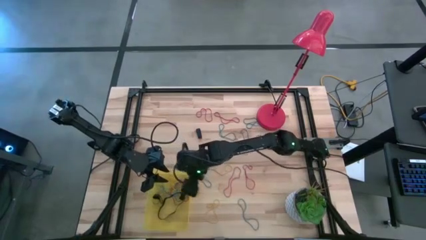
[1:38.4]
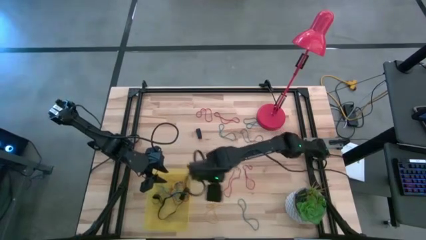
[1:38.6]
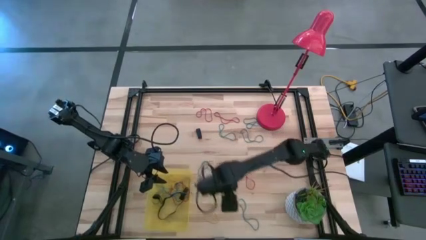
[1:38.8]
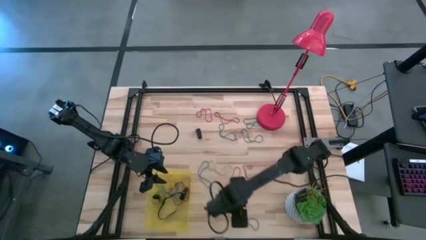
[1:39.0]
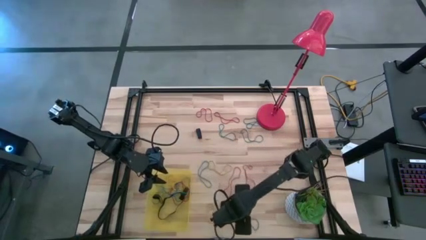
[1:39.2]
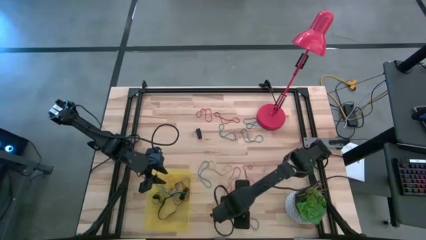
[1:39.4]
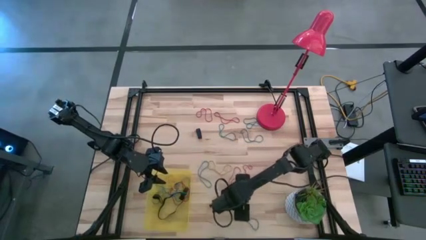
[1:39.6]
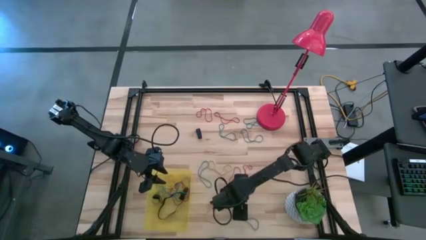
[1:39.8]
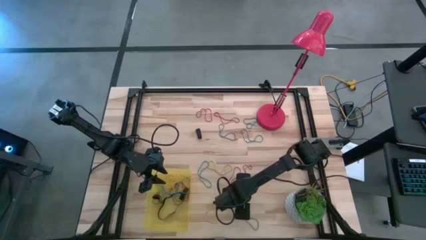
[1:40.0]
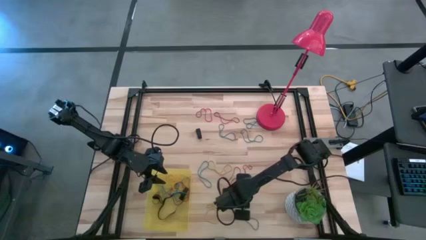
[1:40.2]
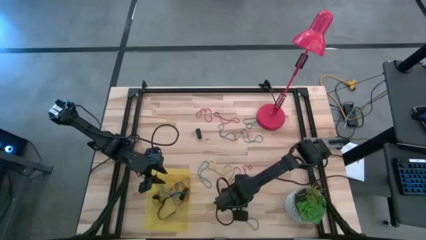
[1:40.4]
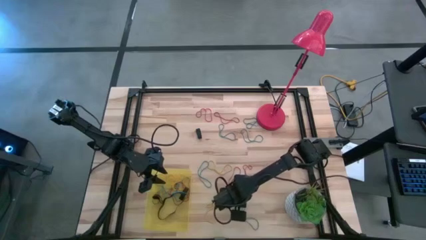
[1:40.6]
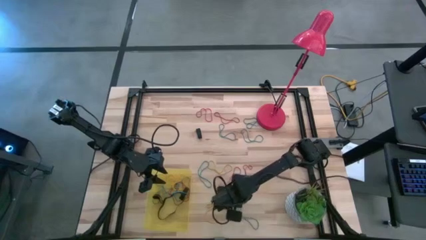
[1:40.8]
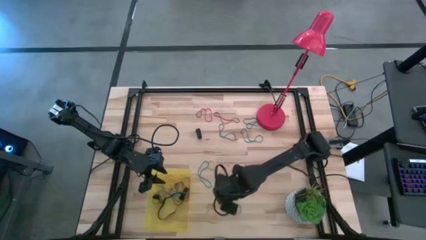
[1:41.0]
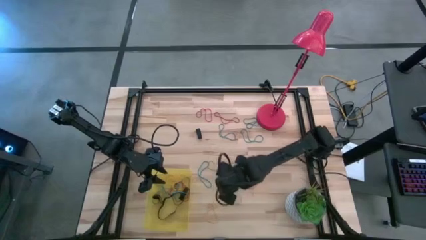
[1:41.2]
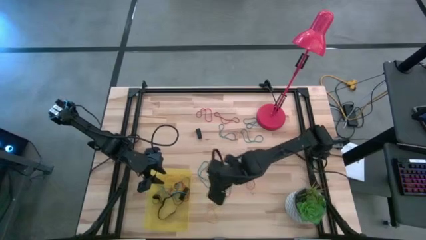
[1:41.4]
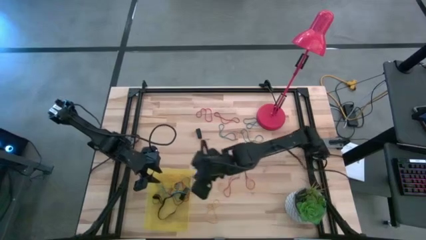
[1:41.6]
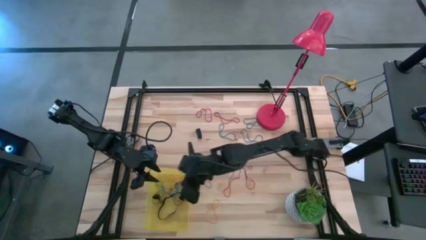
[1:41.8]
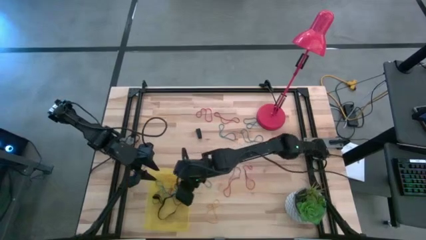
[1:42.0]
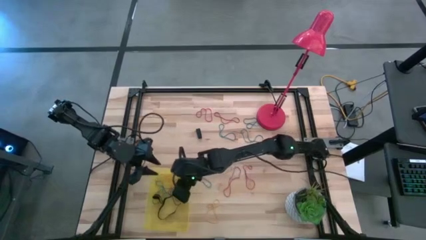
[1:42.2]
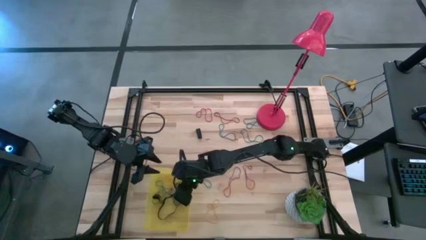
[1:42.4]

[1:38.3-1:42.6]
Task: Pick and place rubber bands into bin
Put the blue rubber band into the bin

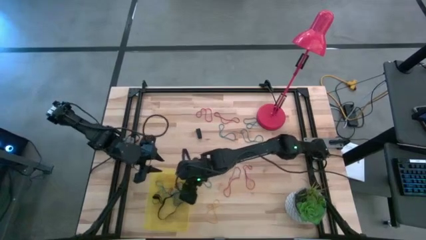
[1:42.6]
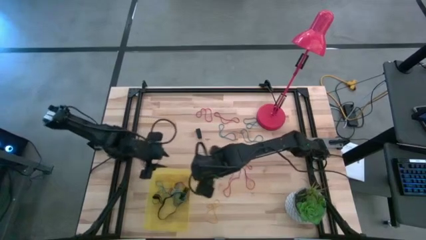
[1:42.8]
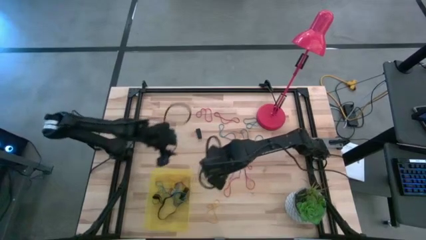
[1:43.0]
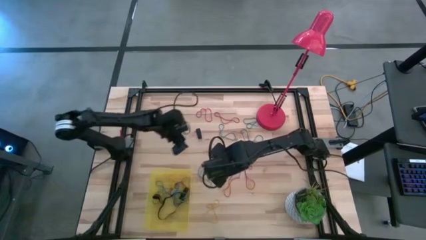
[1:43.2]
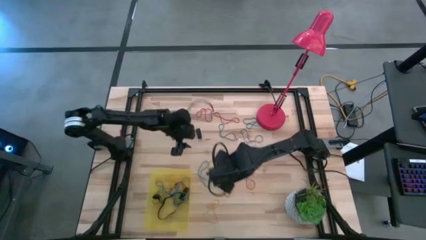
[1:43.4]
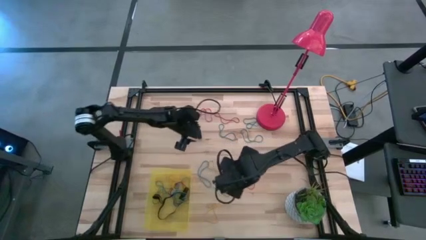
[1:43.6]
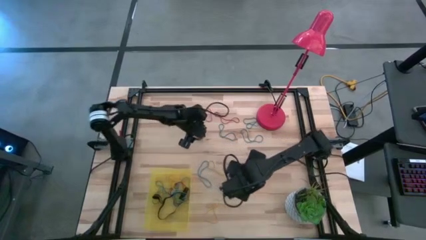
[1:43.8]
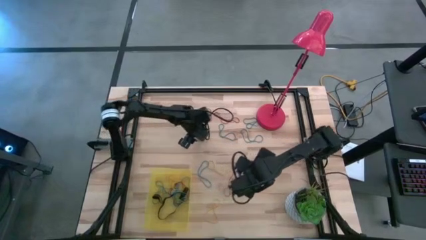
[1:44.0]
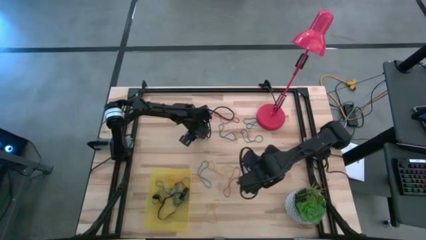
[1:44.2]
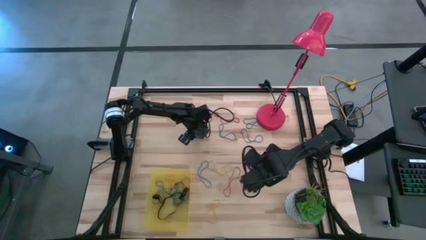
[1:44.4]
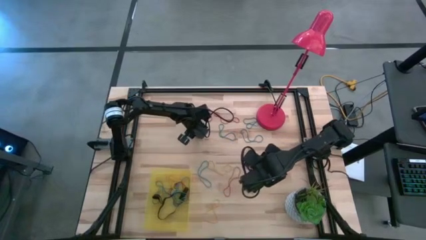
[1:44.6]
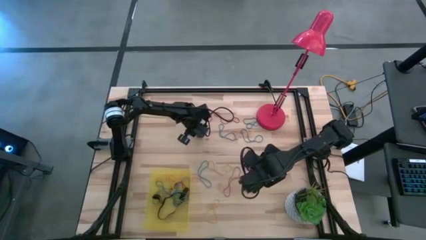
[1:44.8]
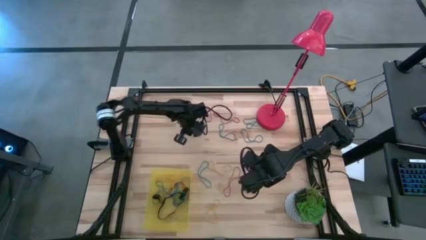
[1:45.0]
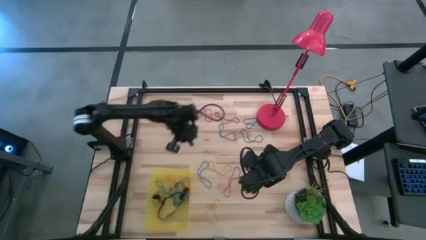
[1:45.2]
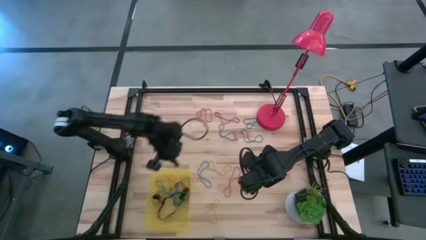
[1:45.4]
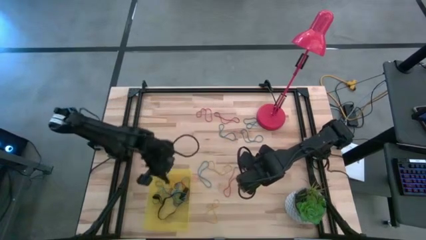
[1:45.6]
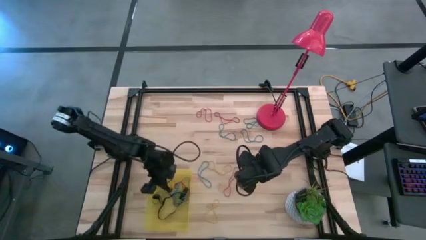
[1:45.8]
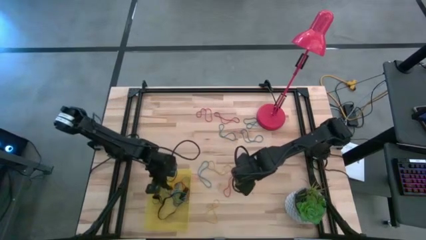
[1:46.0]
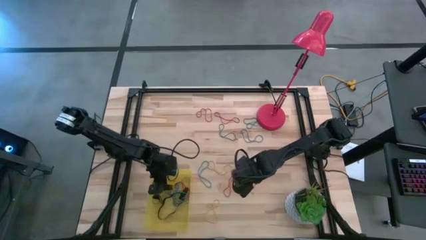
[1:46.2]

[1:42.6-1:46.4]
Put the black rubber band into the bin

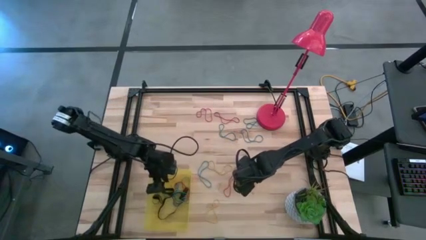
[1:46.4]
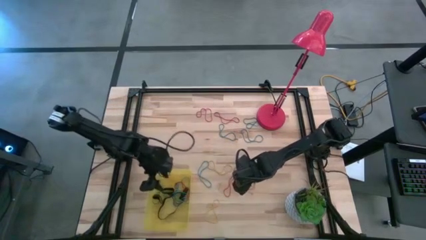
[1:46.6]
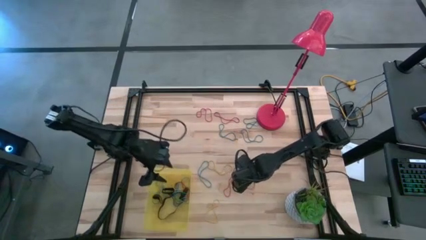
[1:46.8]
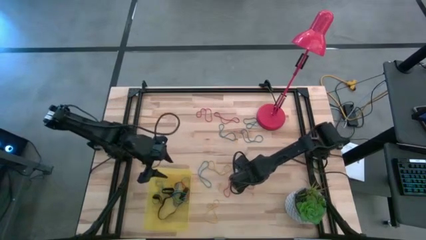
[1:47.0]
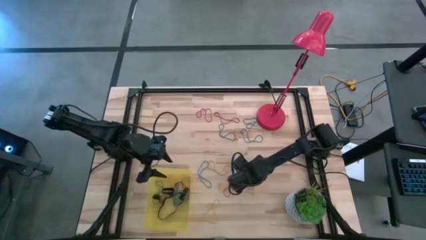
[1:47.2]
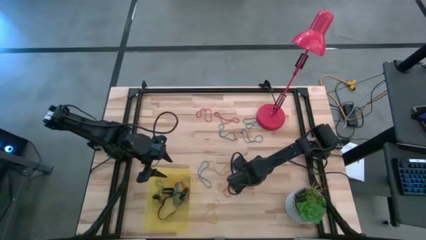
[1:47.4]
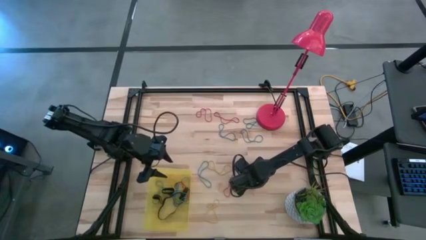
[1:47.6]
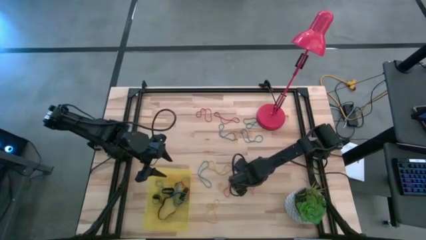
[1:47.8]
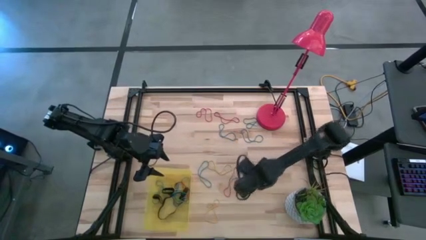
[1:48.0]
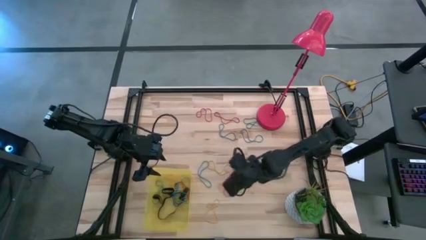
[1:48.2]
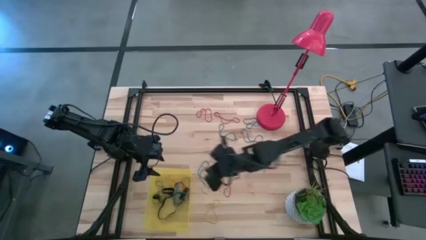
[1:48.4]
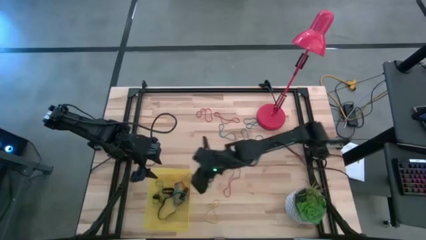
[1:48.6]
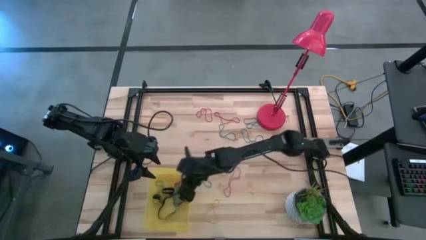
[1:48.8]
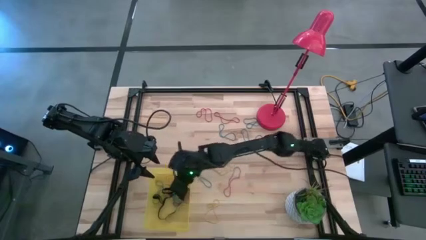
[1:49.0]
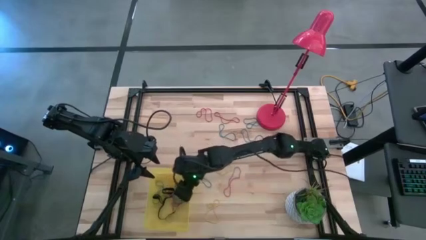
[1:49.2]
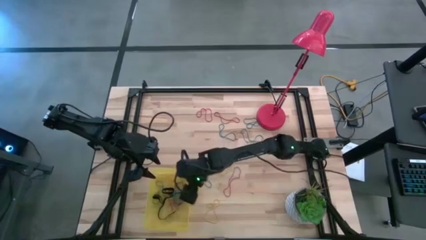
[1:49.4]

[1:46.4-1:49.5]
Put the red rubber band into the bin

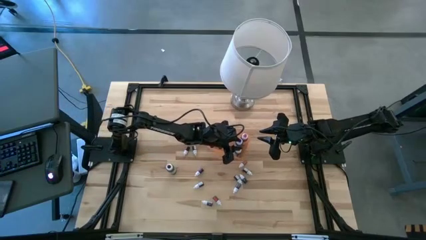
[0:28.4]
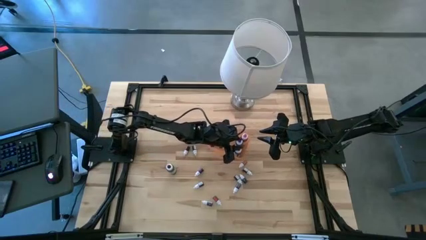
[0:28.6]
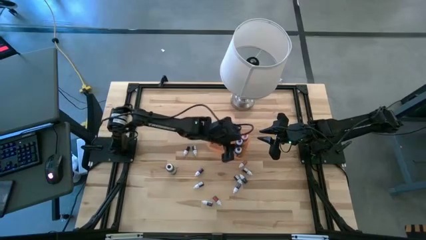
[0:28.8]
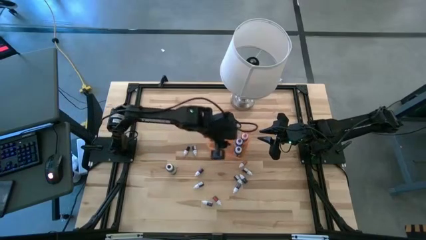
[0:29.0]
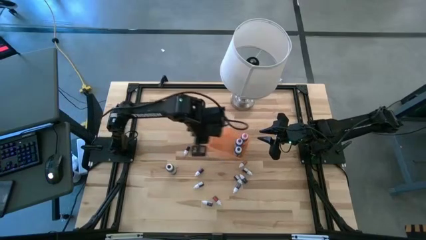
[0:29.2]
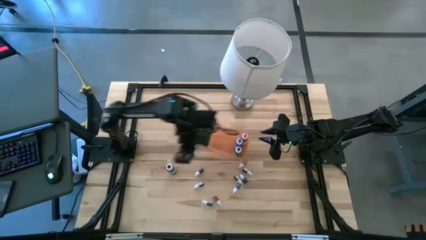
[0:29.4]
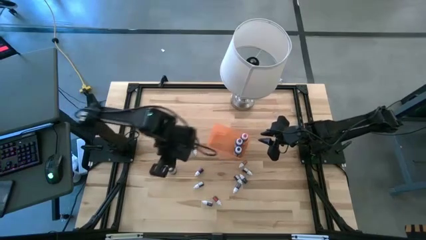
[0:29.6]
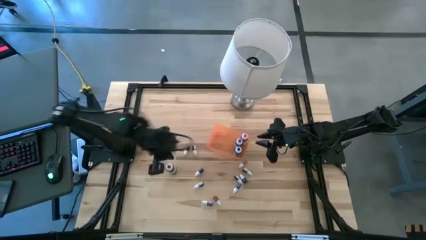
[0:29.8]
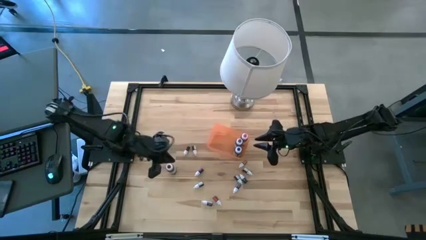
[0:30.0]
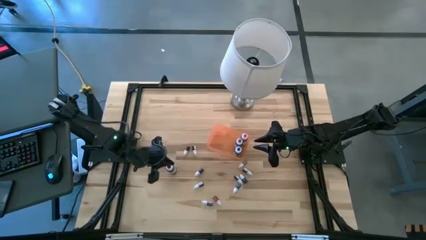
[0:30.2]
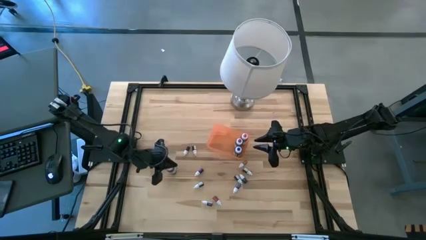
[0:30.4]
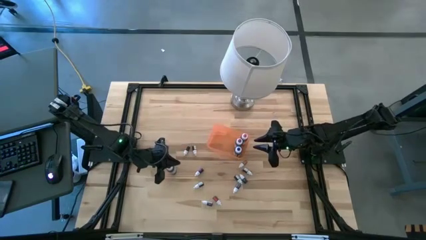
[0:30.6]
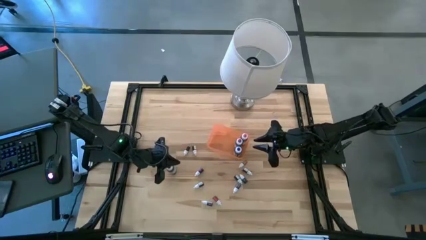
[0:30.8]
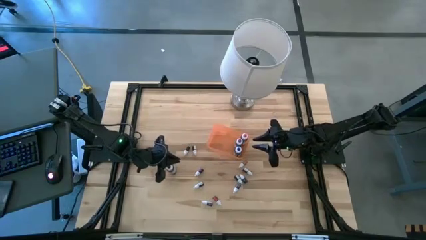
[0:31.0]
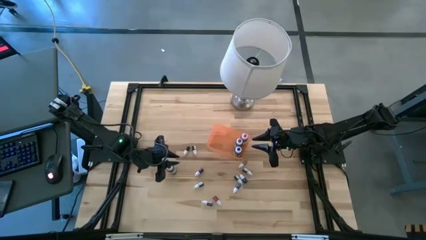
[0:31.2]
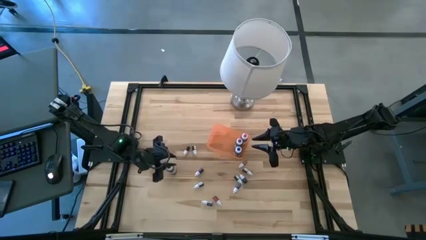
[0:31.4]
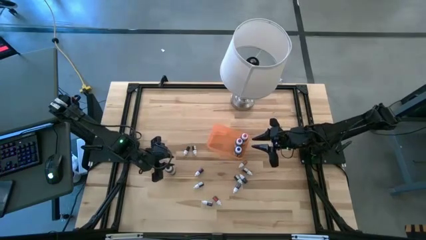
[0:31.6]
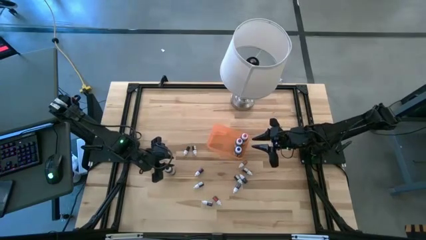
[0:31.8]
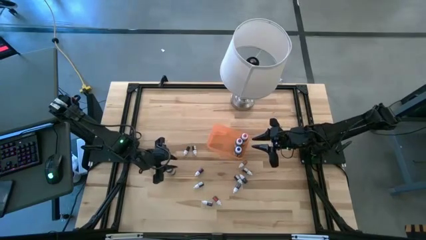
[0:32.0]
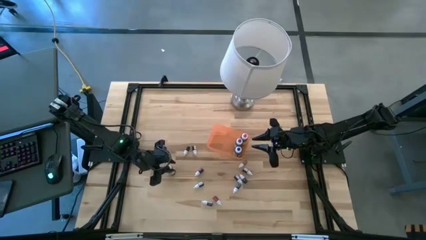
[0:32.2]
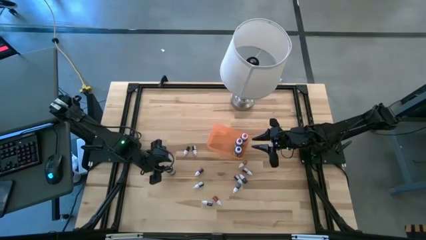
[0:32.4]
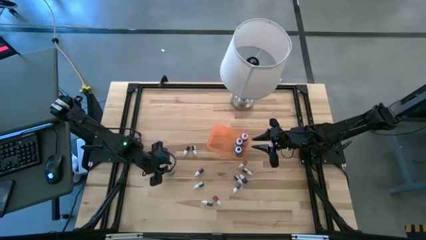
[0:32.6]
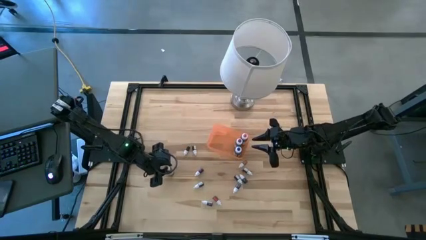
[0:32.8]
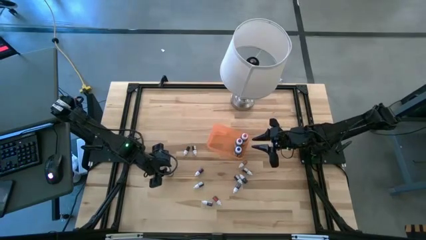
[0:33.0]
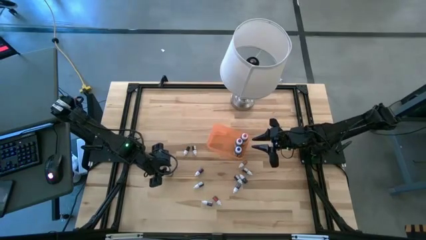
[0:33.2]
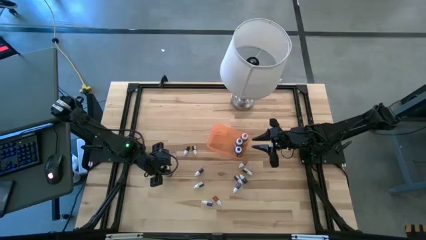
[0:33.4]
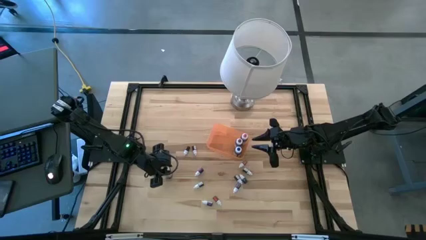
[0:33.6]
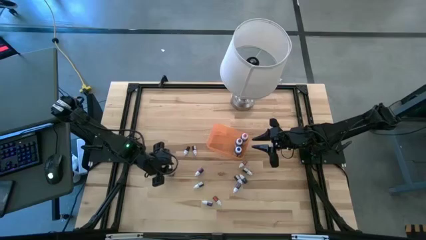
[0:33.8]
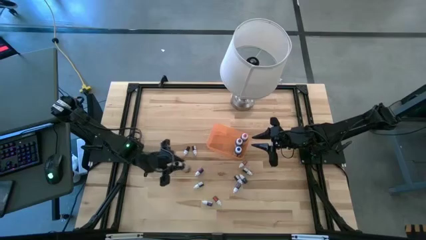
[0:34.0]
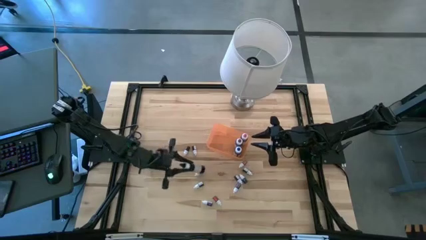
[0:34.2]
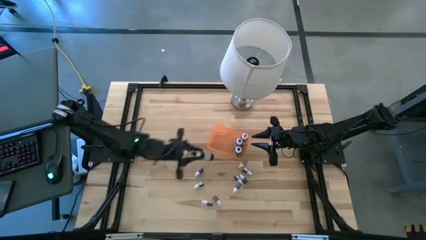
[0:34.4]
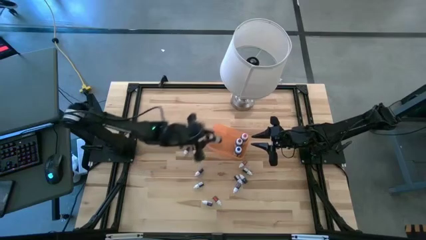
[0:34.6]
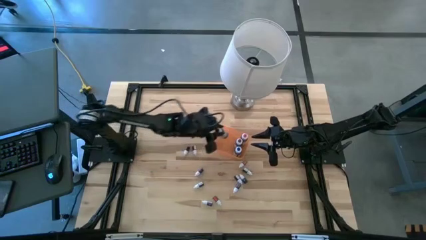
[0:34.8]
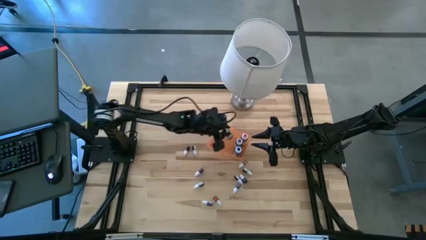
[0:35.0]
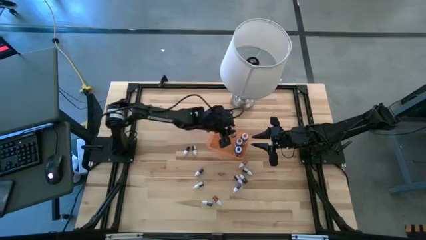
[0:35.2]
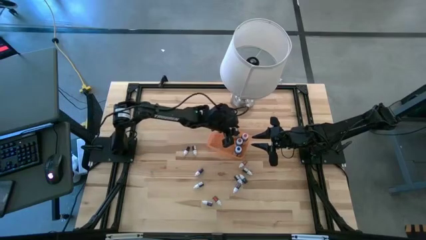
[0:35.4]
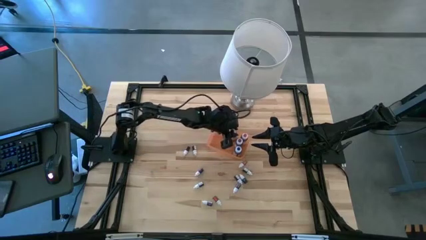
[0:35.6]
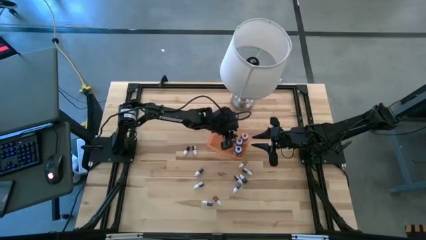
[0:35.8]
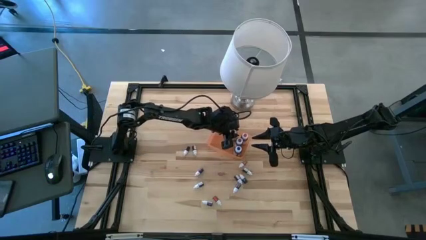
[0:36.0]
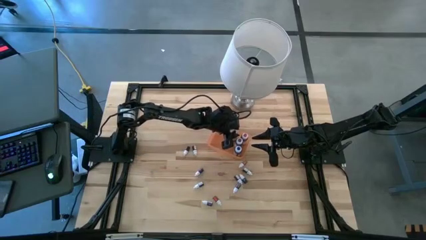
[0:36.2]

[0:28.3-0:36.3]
Task: Pick & Place food coloring
Put the large black food coloring bottle into the orange bin
